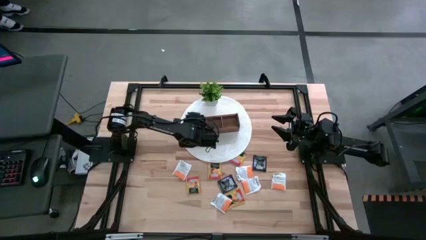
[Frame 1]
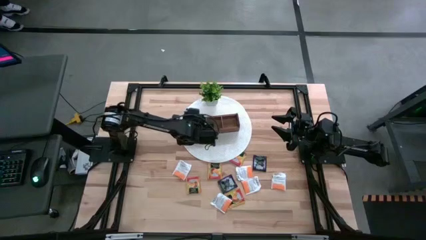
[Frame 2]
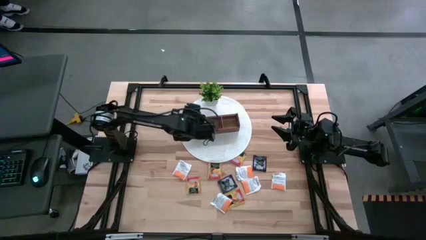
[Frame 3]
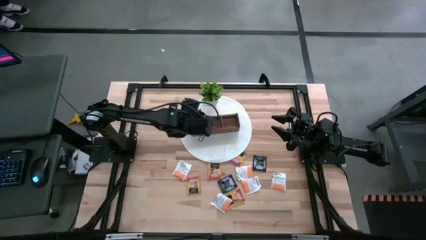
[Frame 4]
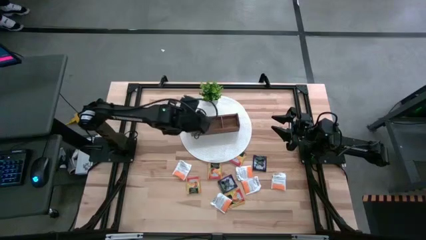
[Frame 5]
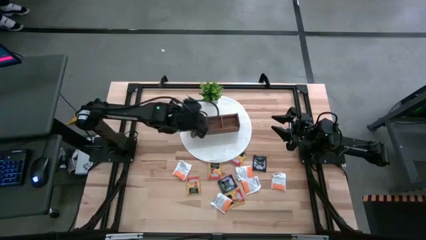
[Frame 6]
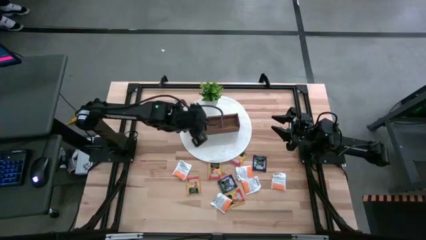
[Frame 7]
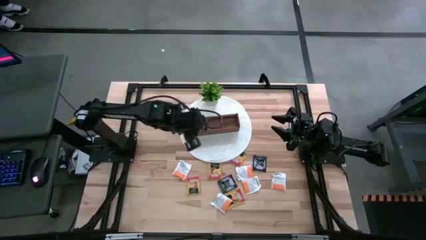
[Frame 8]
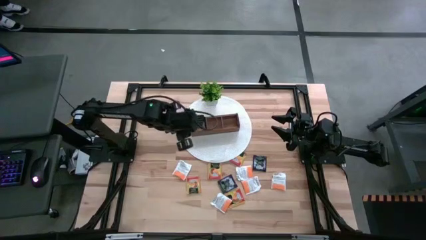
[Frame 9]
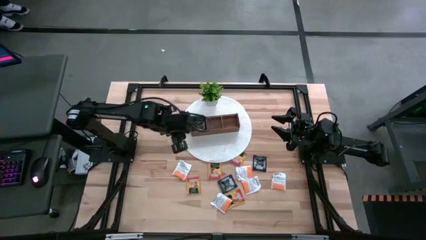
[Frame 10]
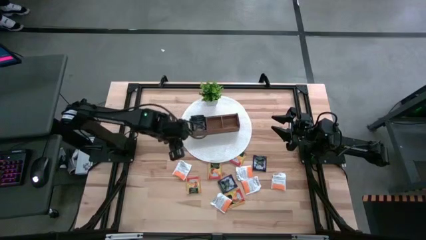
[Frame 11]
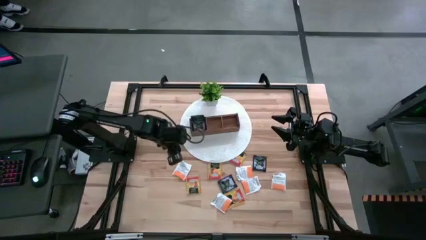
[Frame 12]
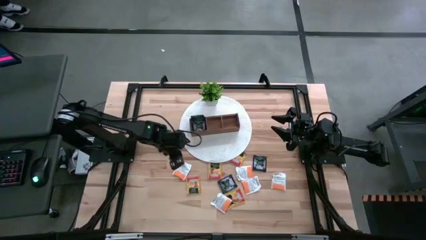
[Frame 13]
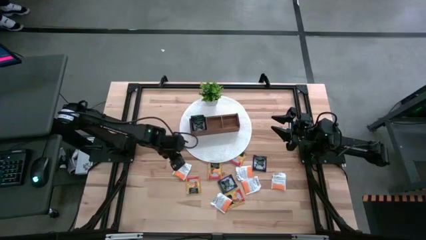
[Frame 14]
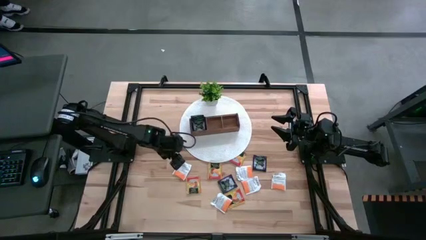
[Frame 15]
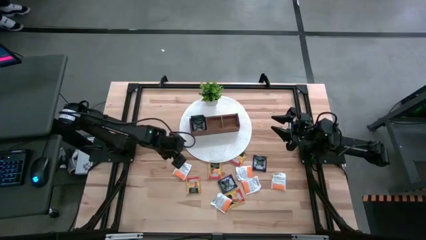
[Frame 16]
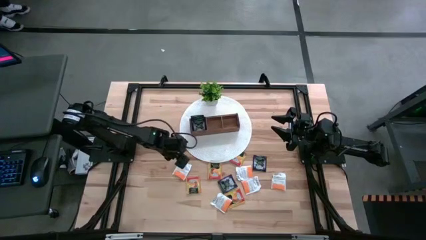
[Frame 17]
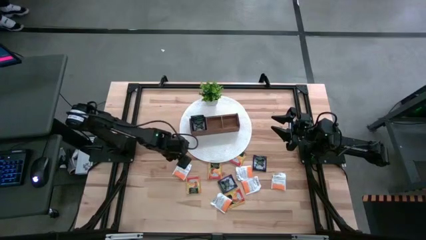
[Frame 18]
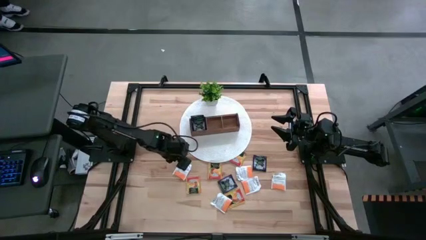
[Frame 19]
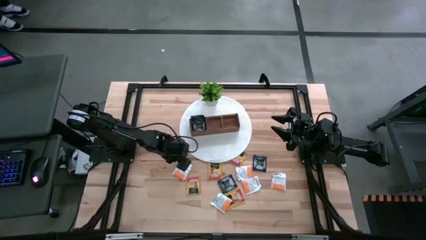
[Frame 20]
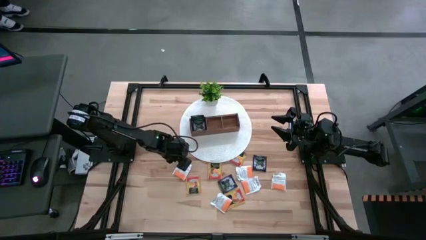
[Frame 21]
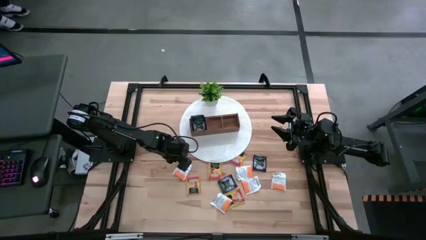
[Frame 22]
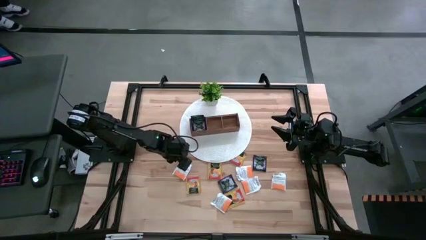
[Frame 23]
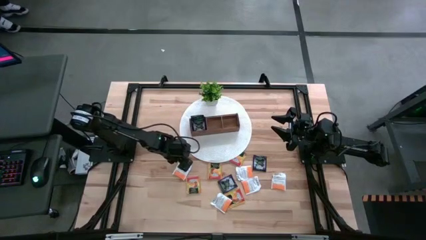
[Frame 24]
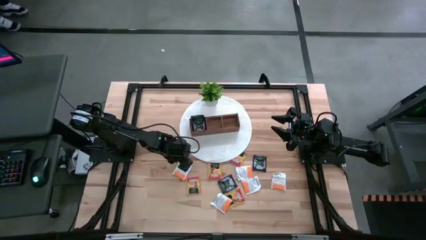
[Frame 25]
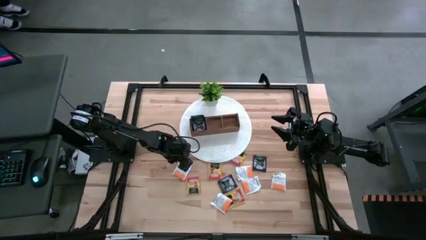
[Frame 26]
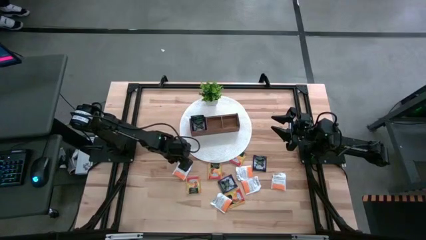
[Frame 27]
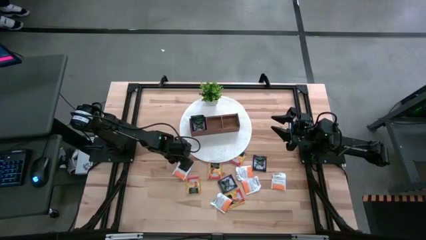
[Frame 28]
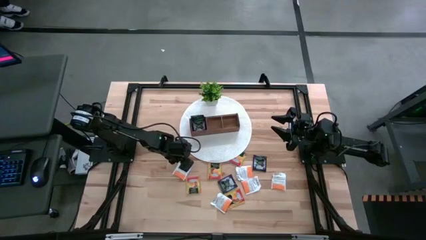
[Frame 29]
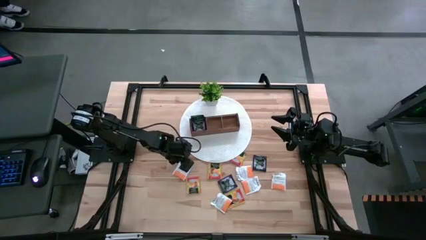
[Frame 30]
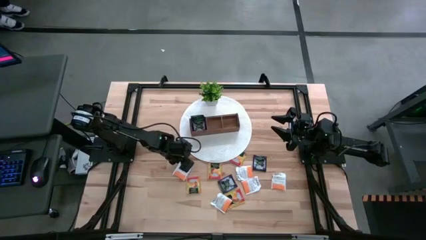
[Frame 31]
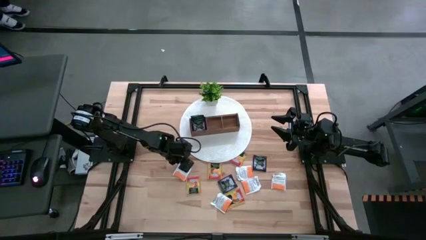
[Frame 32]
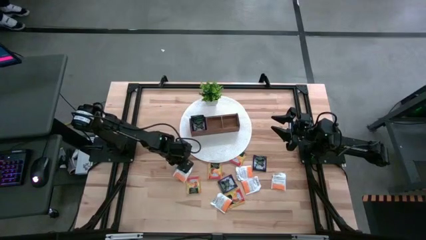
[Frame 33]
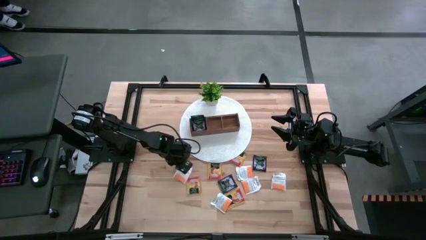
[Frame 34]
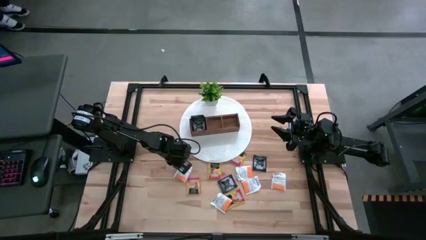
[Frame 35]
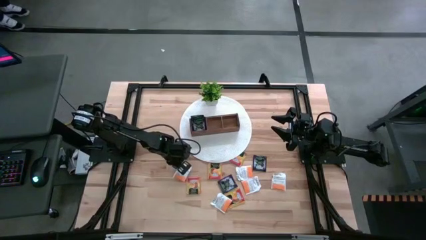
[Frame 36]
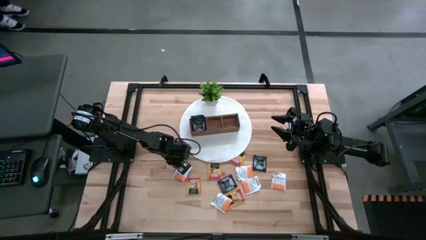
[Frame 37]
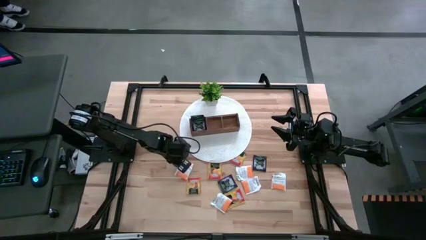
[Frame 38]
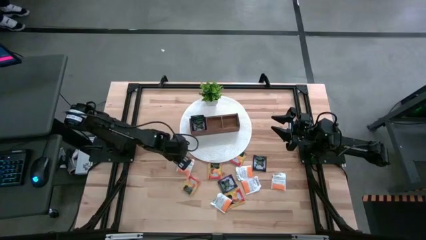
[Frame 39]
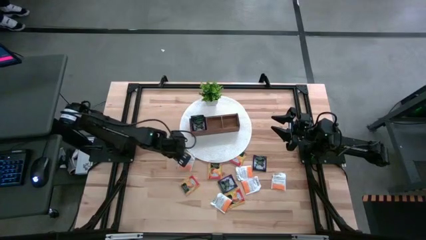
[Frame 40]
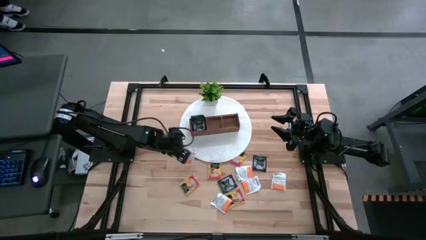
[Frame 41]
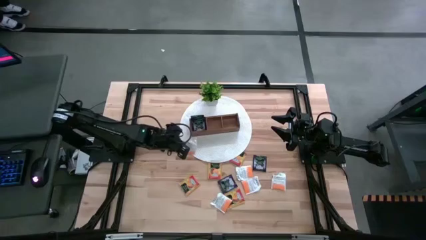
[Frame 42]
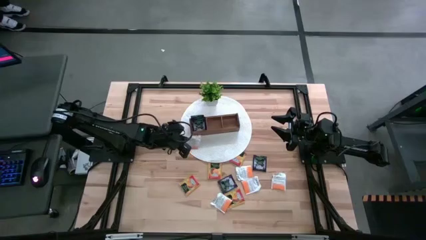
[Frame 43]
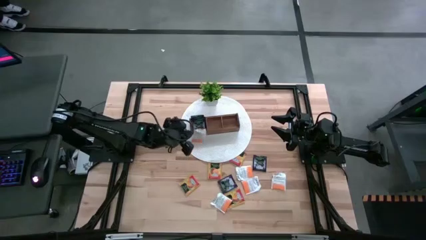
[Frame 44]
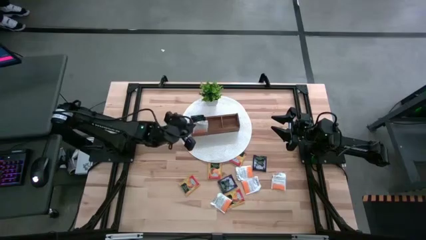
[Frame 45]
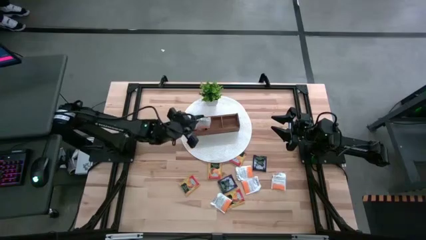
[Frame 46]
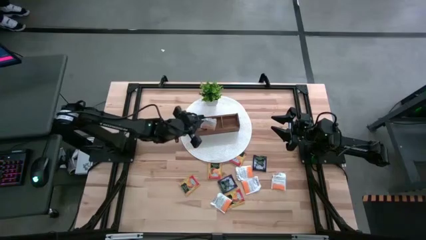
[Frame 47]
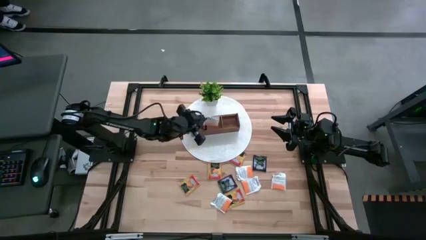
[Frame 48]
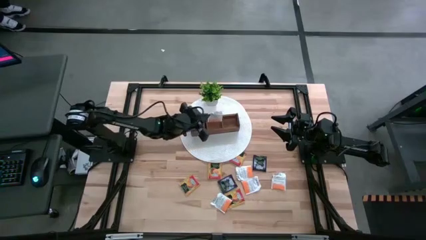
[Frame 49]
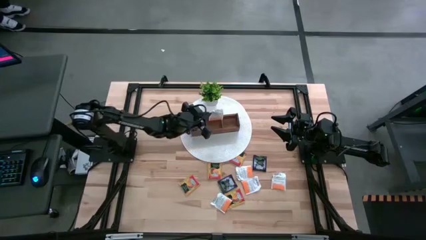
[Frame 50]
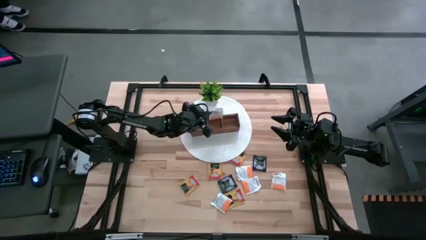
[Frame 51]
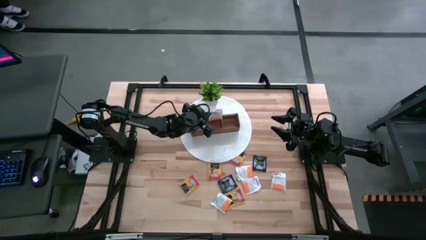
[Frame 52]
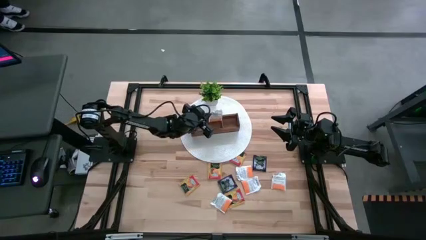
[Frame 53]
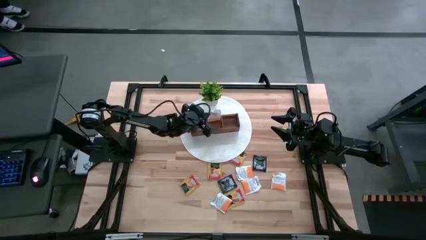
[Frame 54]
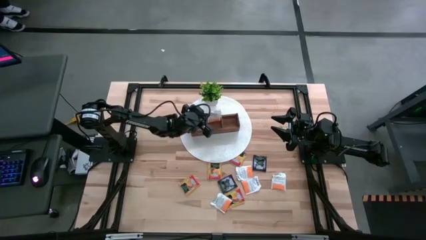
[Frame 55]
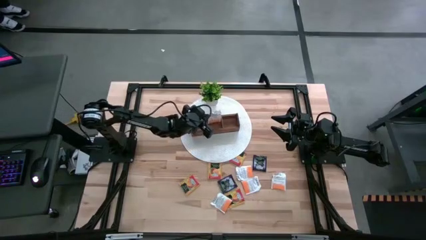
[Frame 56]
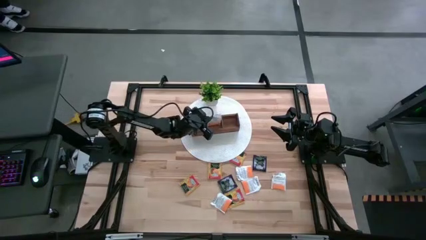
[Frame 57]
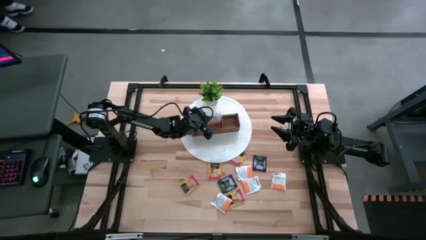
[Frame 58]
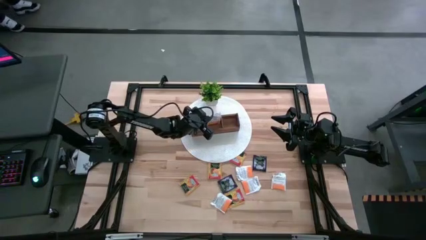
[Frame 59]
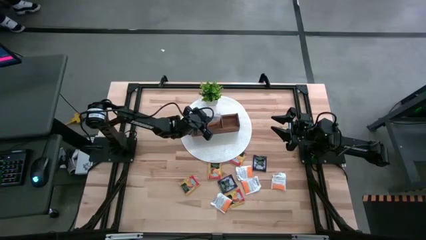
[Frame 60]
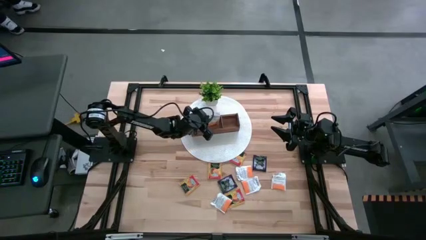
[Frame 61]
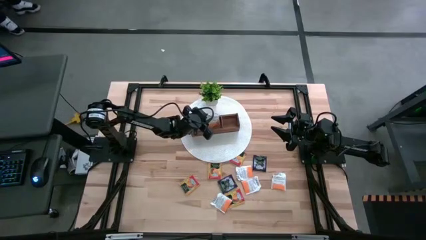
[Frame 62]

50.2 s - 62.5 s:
Task: Pick & Place Tea
Put the white orange tea bag into the middle section of the wooden organizer

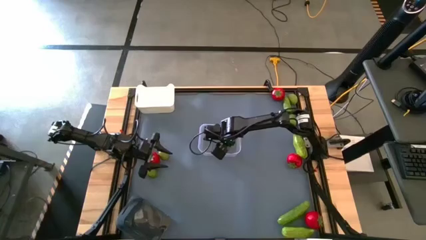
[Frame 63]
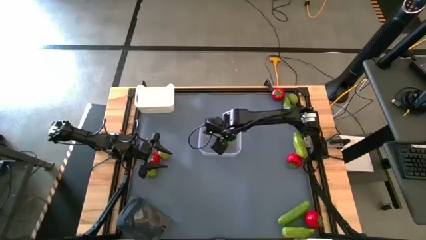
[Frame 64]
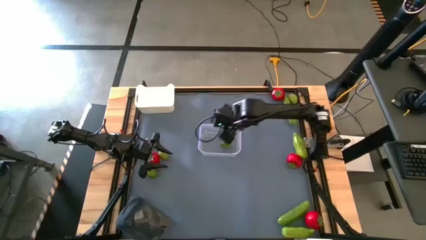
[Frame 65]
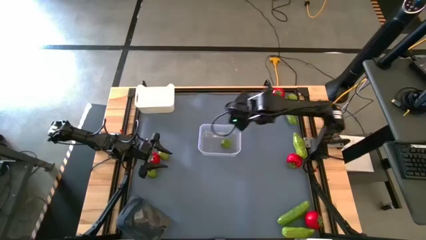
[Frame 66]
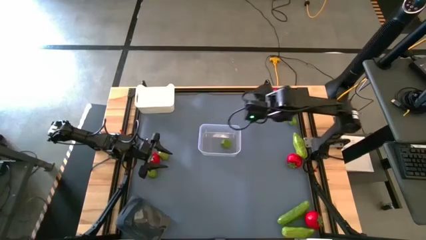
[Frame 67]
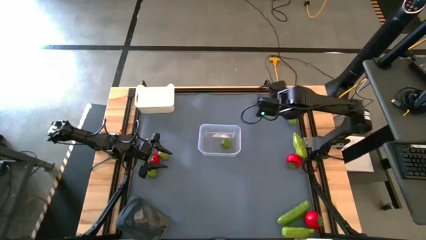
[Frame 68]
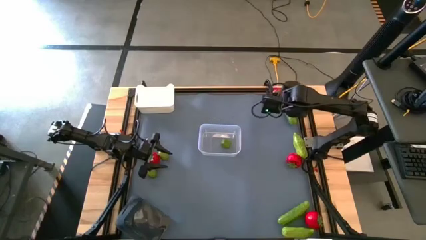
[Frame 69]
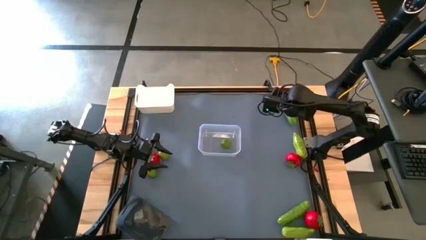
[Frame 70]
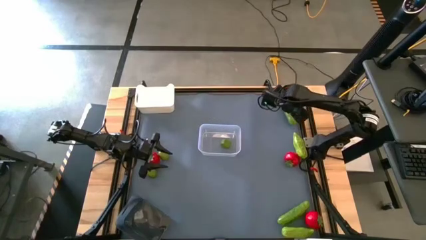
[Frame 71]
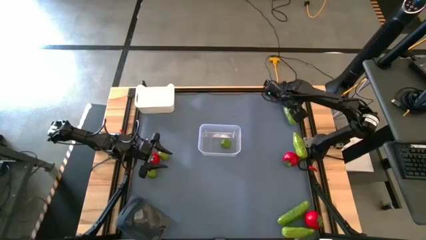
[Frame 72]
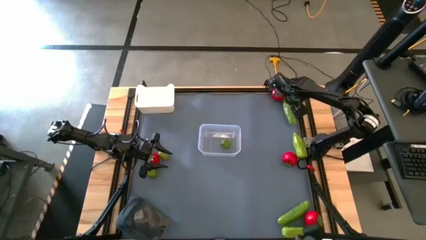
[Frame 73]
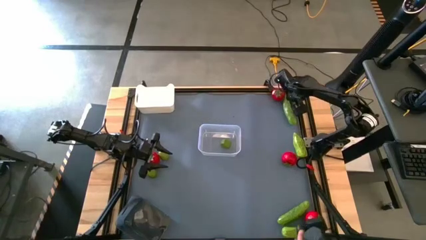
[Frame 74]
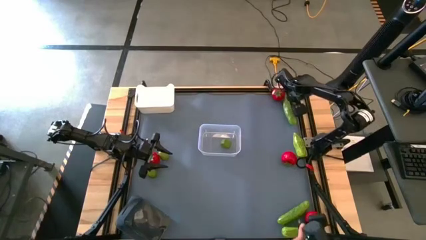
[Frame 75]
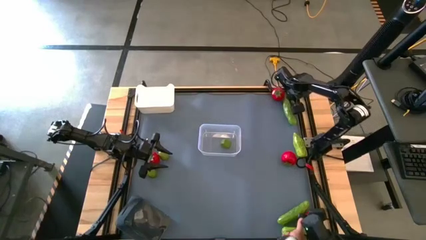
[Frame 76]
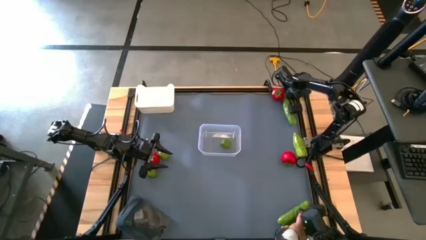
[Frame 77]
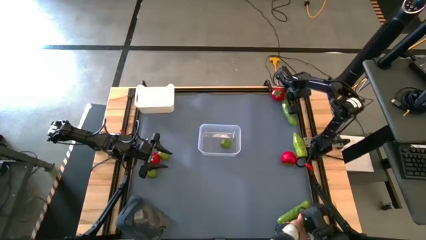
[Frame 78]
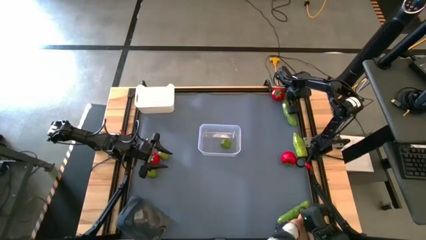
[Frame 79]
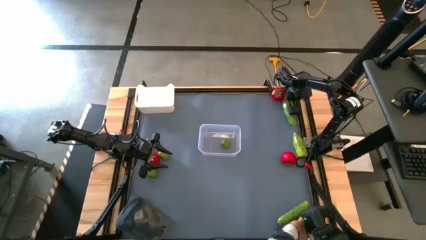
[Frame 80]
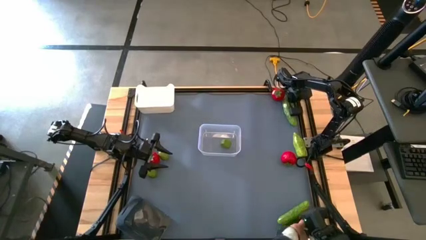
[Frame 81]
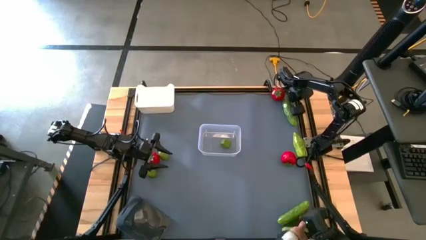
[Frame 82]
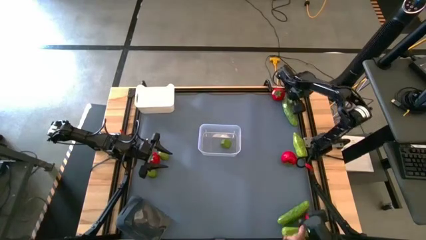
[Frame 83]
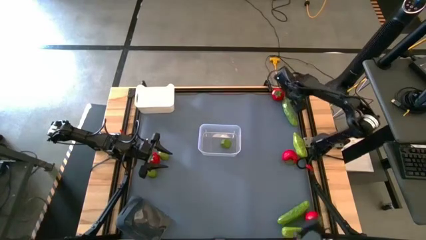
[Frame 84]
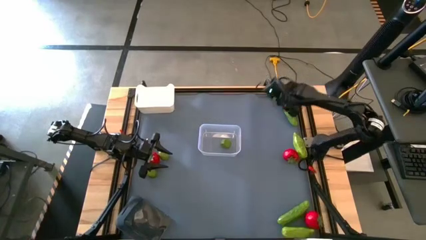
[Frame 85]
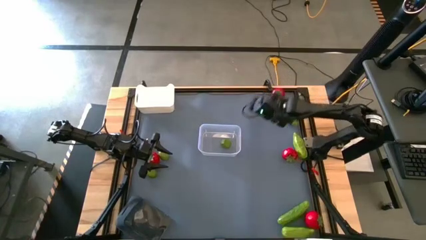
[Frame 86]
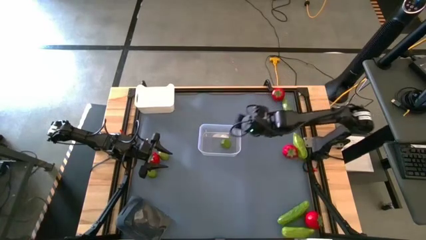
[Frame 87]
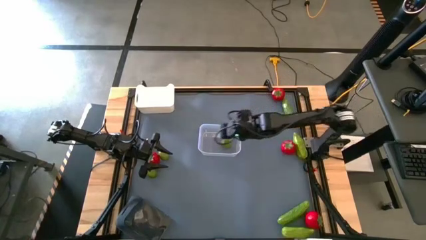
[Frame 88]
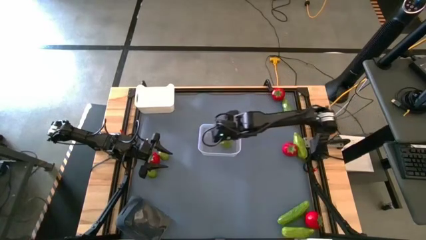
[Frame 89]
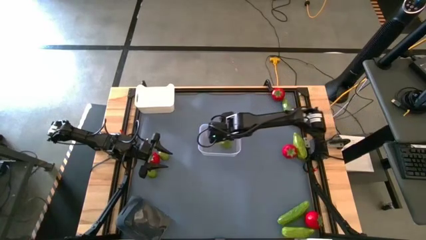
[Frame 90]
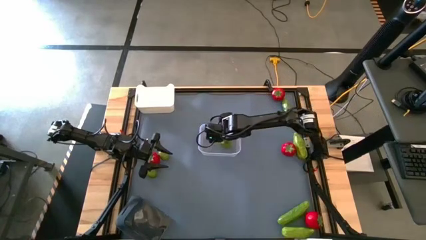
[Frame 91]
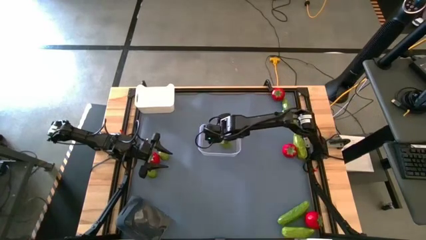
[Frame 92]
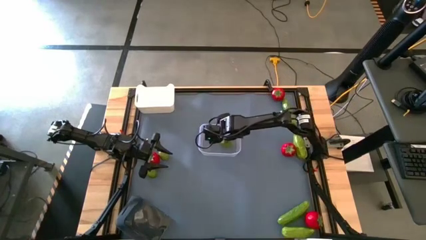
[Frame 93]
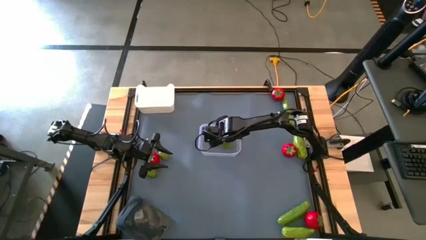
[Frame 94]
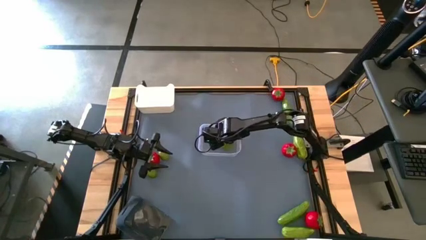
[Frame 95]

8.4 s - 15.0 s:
Task: Sort produce into baskets
Put the top right lemon into the transparent bin
